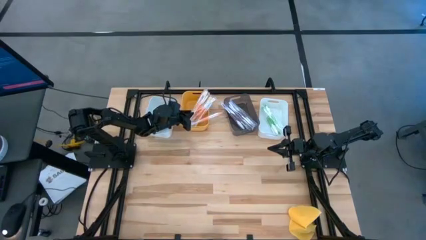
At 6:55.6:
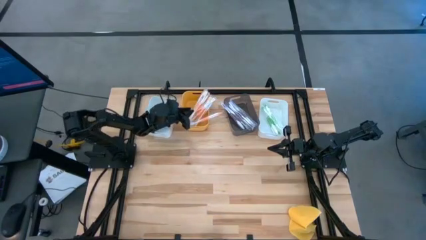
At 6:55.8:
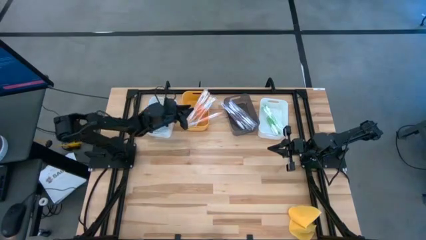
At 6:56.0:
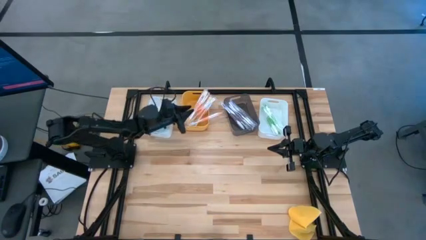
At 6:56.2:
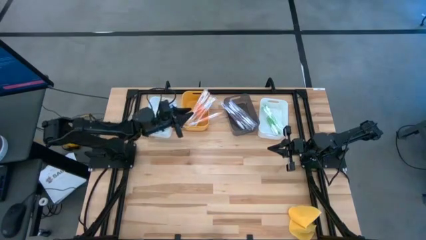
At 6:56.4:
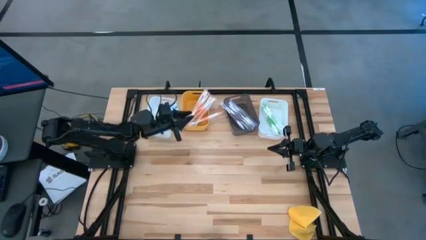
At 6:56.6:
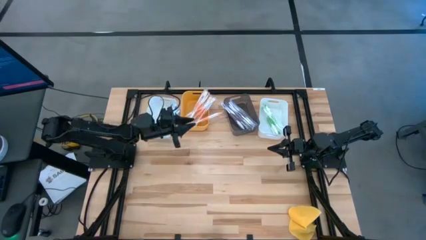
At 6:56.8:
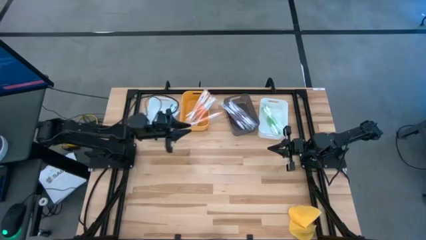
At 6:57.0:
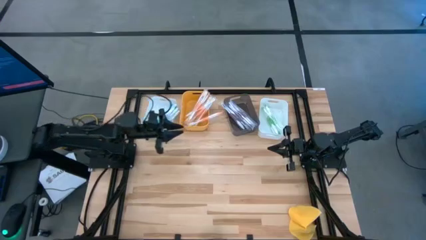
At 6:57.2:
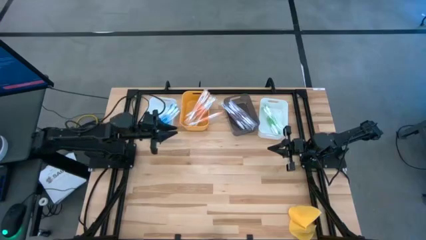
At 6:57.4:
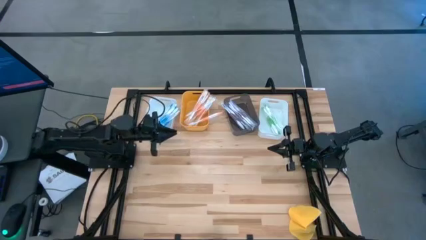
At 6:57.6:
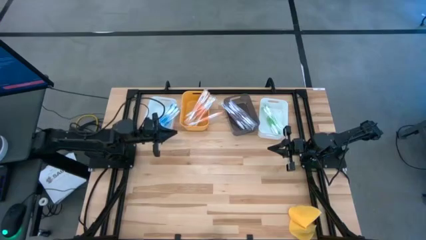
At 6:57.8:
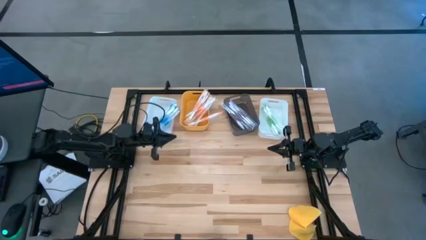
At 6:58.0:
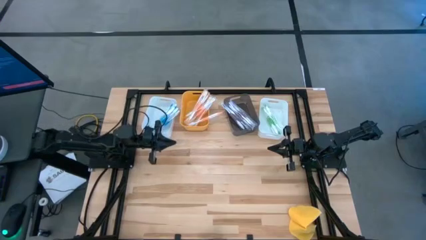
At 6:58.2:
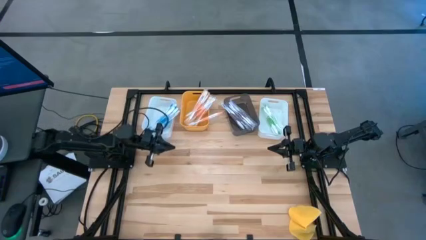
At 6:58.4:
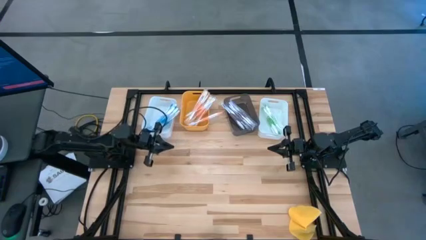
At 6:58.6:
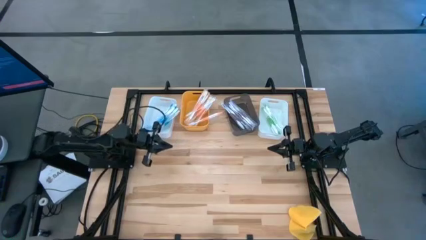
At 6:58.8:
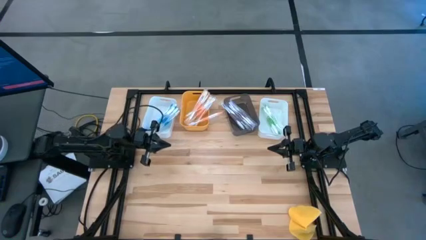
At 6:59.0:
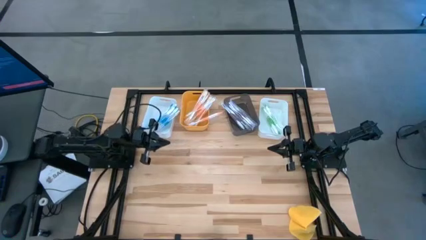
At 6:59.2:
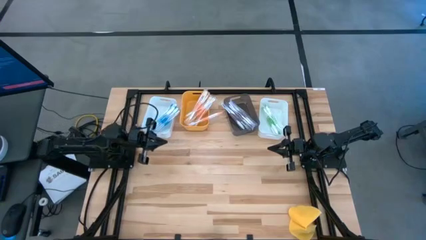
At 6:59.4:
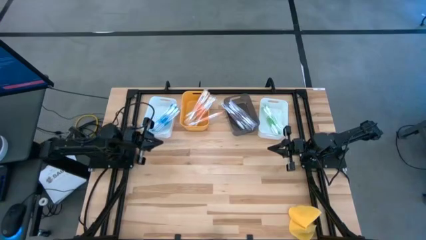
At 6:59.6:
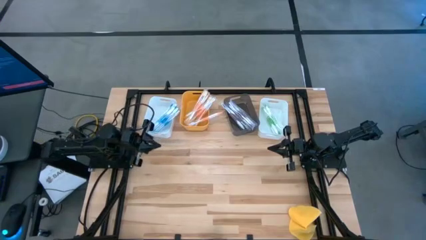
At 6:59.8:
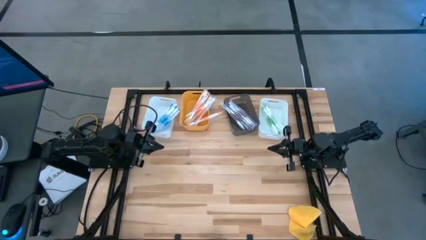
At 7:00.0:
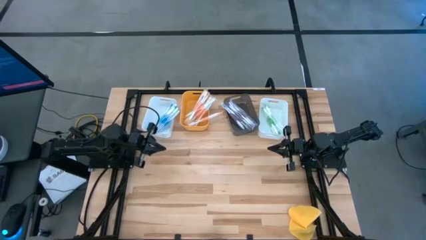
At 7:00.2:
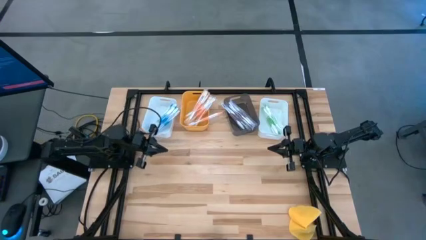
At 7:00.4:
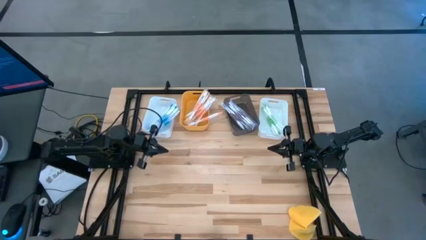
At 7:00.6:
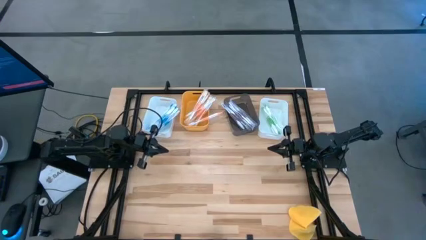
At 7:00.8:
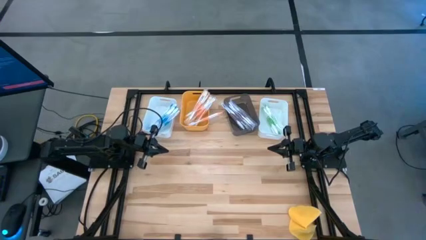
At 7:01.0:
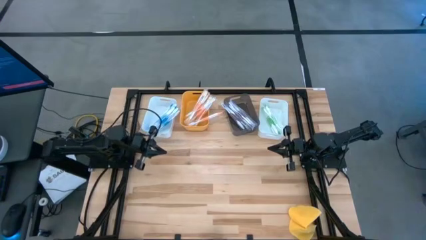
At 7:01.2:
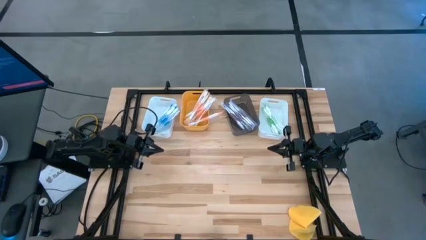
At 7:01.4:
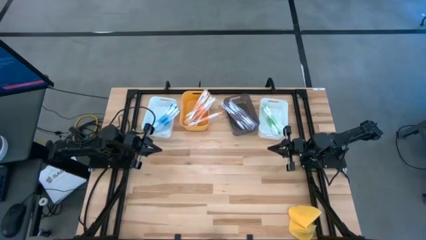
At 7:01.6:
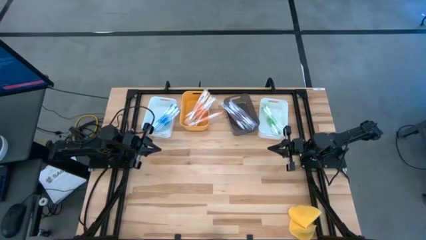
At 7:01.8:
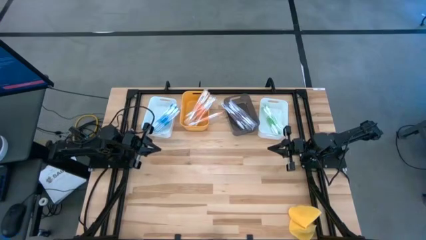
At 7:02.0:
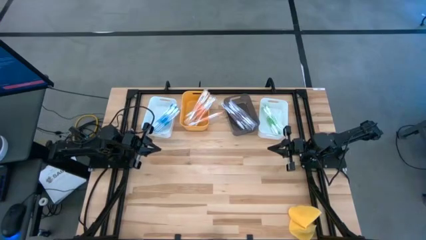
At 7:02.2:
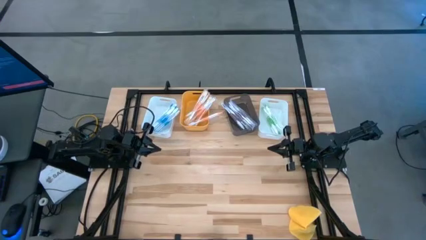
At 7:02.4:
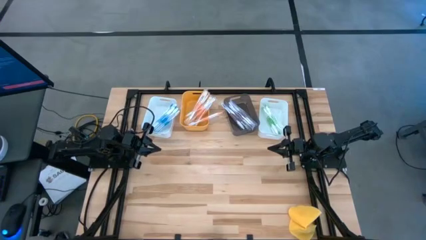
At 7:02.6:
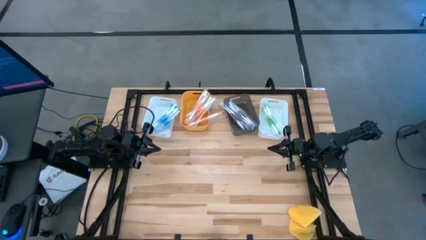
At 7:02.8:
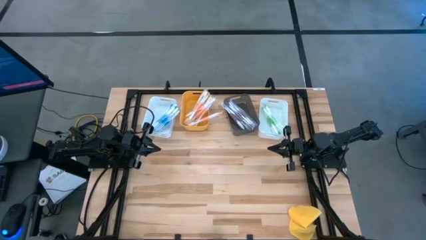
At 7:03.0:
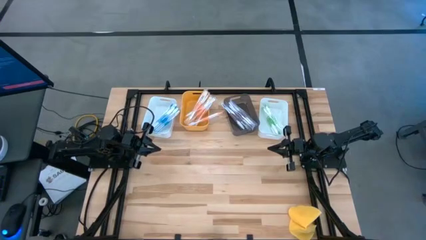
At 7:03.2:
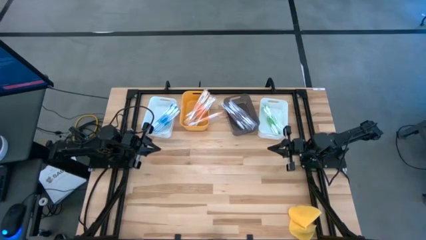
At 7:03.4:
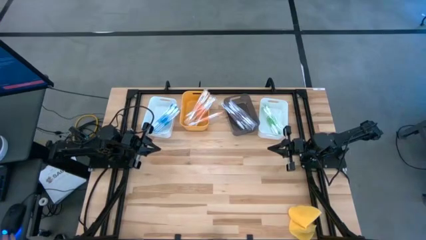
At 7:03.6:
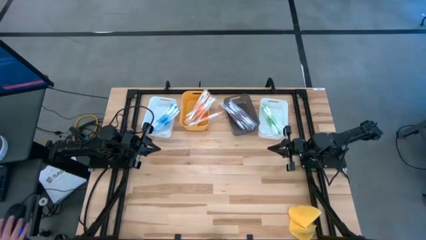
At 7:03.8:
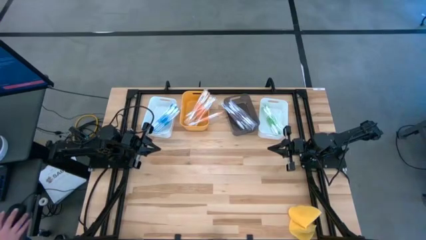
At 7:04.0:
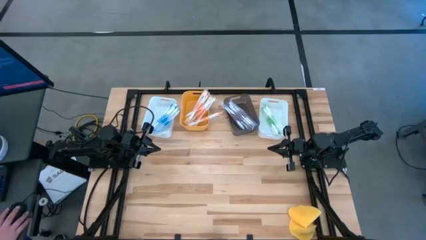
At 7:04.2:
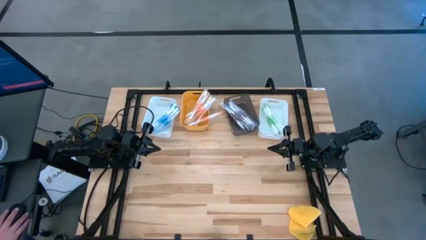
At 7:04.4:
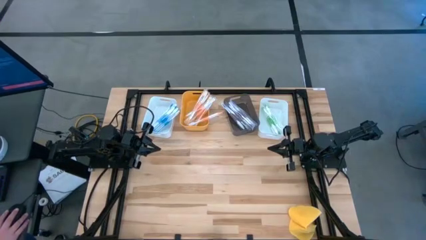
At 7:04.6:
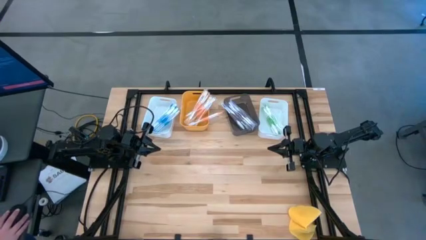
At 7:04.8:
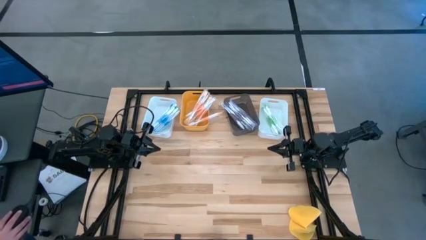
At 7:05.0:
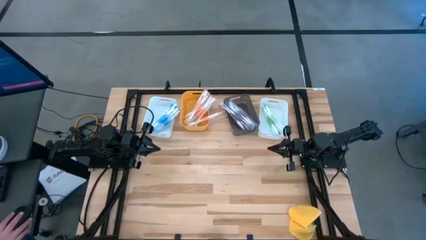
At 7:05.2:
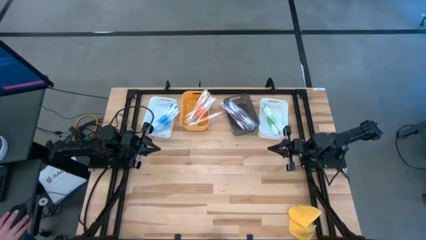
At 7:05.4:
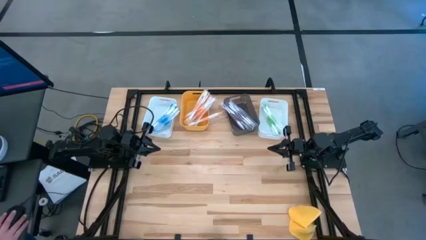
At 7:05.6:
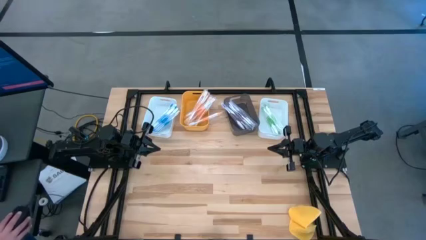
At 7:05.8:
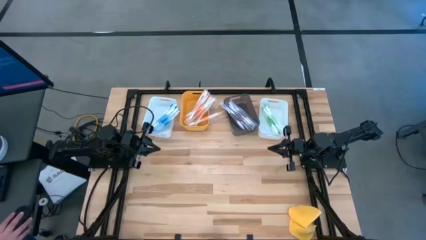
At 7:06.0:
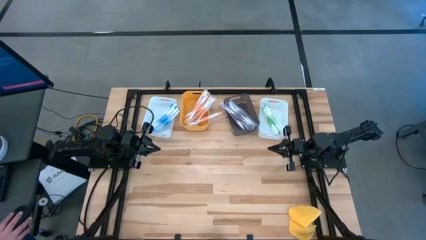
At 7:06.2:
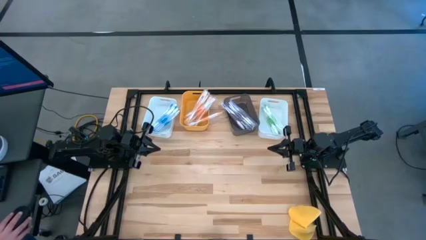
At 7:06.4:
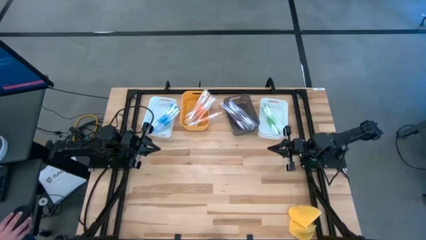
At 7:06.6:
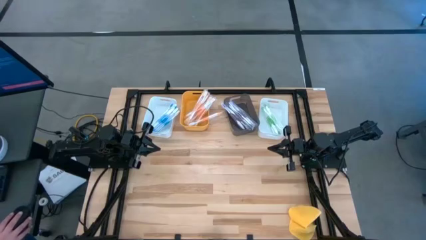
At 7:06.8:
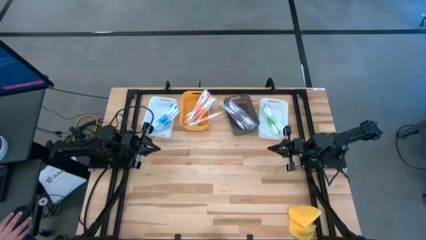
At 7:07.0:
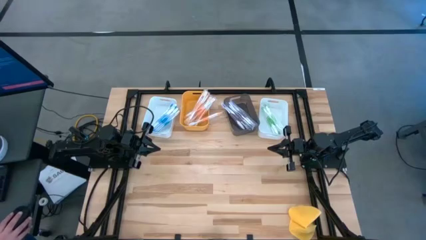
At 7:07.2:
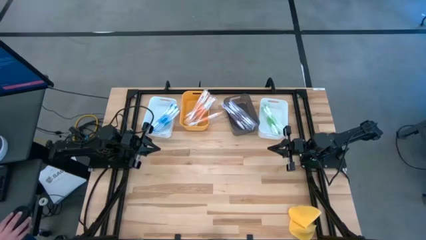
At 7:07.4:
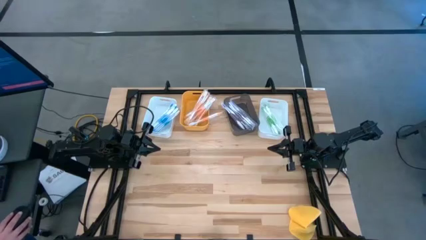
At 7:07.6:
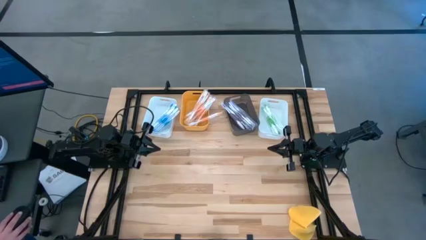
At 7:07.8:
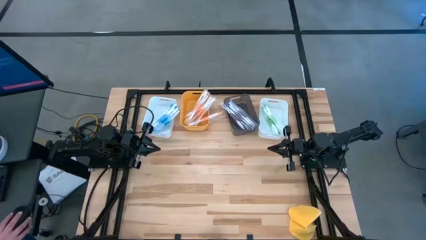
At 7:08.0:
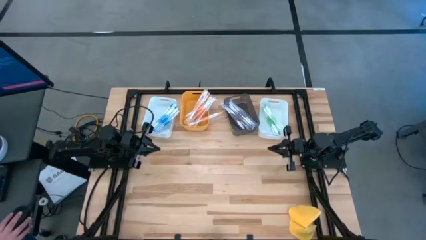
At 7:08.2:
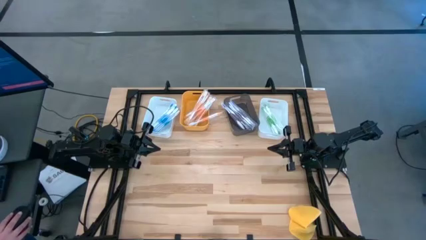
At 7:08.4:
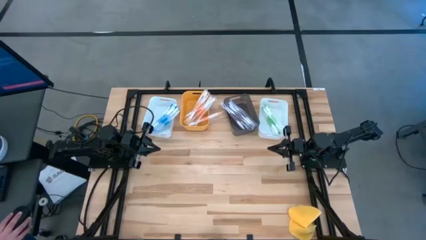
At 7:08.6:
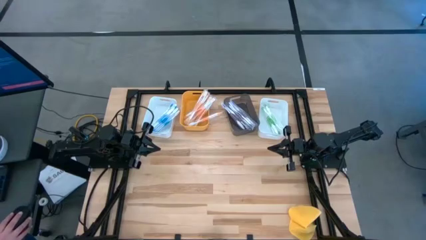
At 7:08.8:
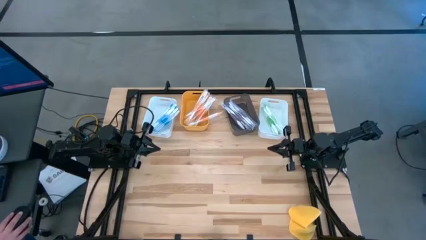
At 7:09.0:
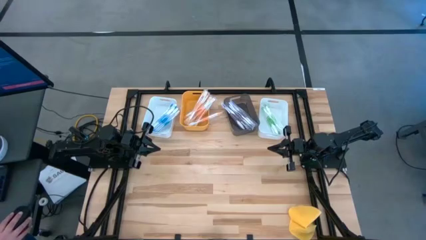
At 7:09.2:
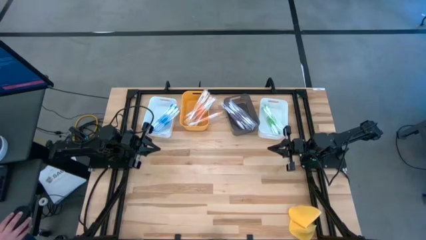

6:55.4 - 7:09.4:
Task: Pick & Place Toothbrushes
Return to Home Position

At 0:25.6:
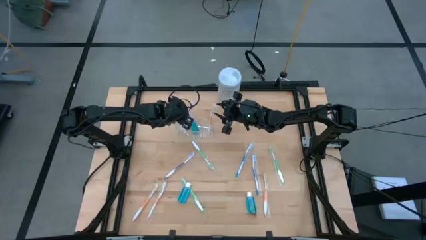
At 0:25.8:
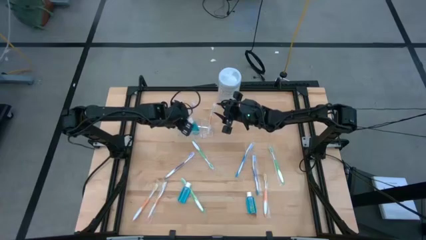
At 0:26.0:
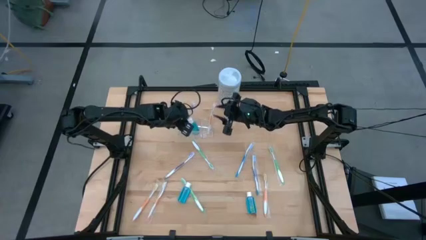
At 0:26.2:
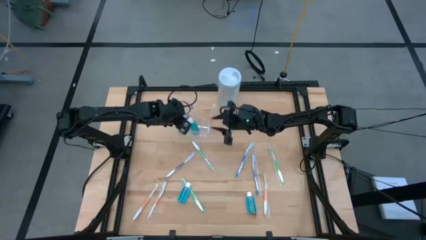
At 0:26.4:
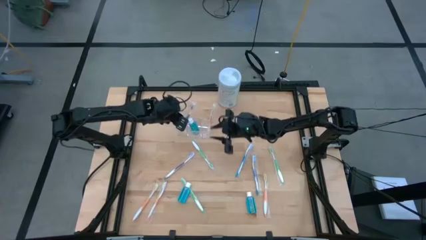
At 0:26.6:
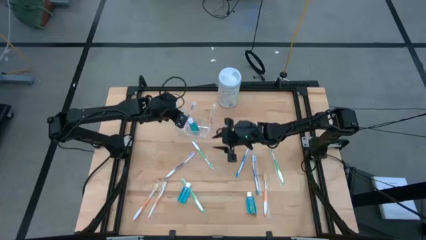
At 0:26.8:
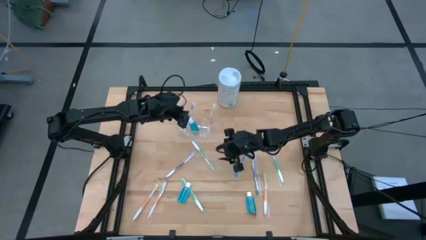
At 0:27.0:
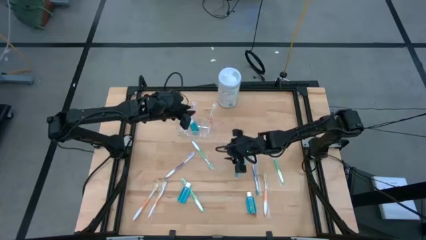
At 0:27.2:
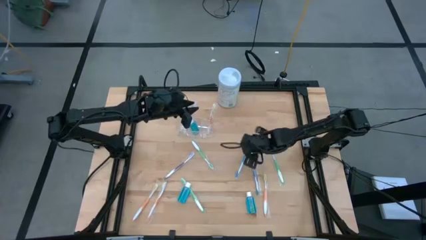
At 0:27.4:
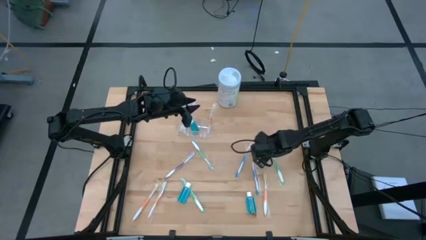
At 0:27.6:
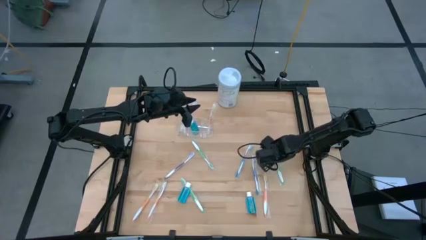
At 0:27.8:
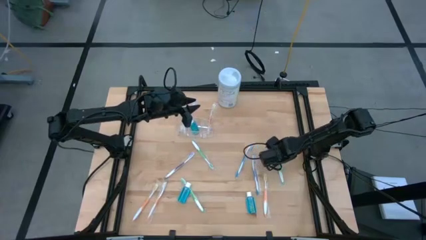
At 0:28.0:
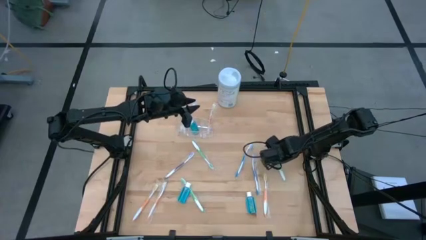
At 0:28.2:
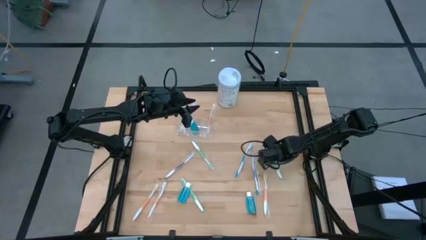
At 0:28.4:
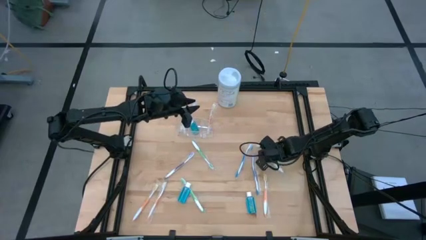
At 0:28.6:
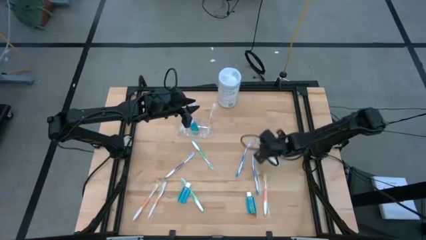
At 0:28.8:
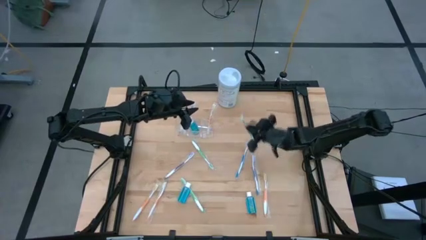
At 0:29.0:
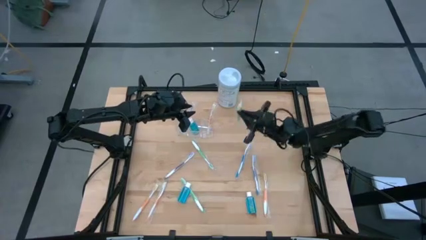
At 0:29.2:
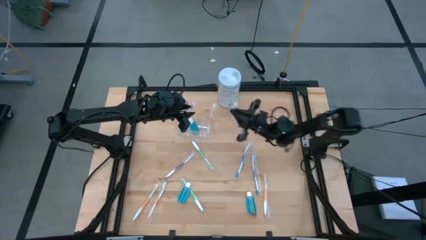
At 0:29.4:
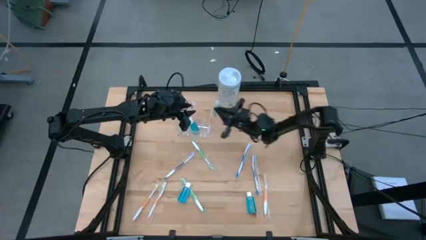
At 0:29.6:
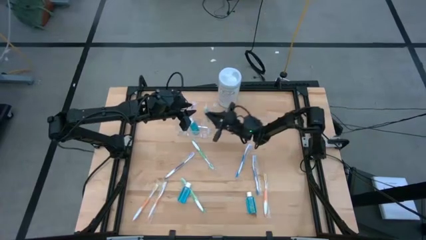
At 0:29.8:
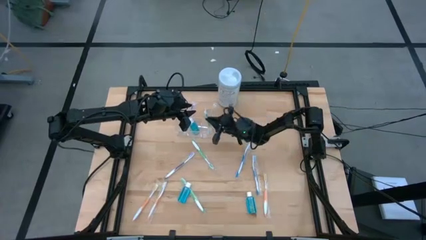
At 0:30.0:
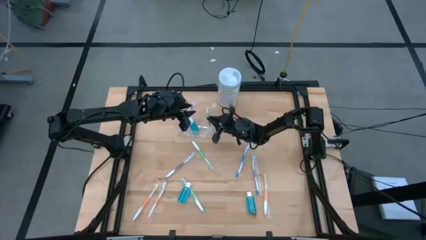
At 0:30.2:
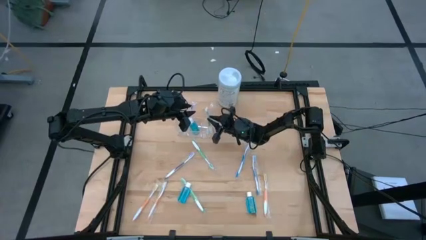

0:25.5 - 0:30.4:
Task: Pick & Place toothbrushing station
Put the green toothbrush into the transparent organizer
